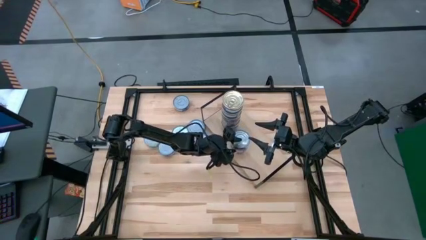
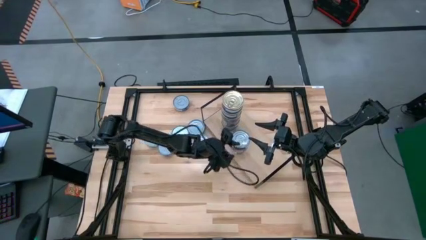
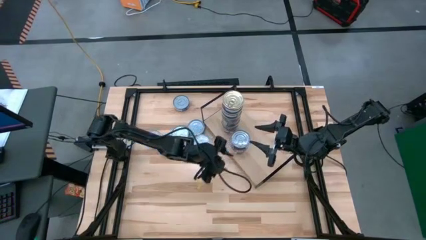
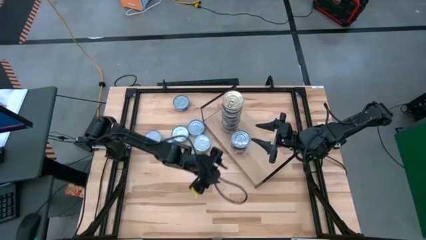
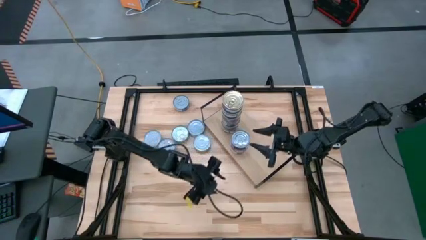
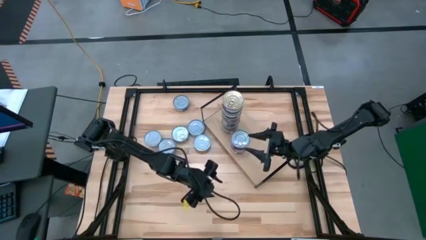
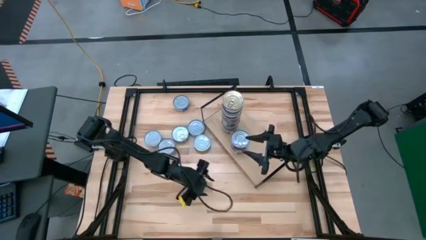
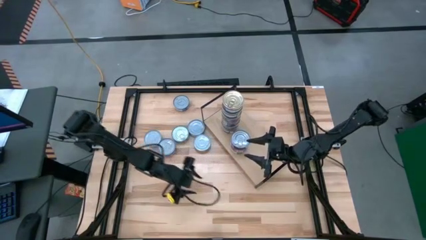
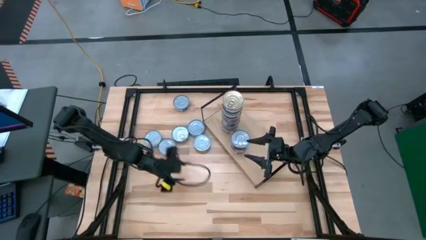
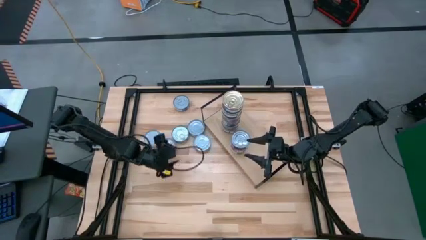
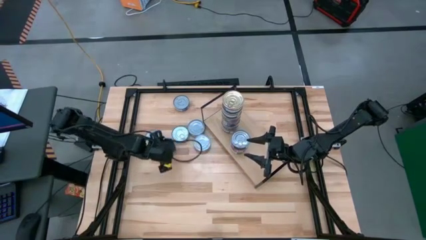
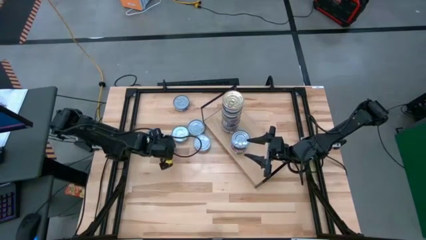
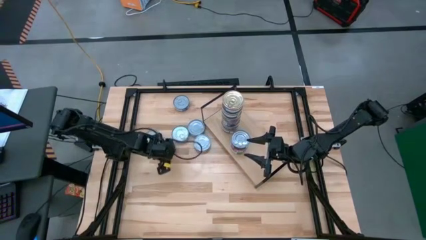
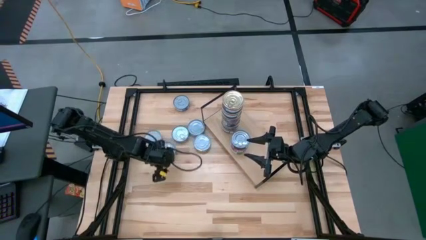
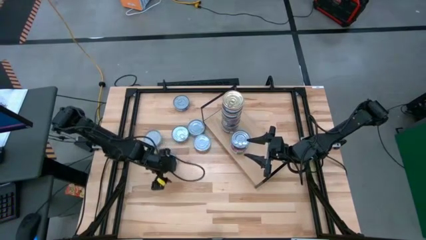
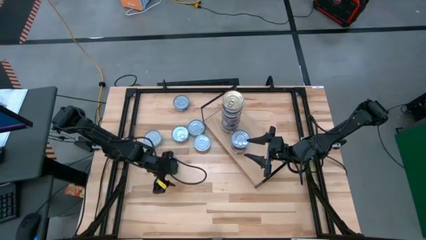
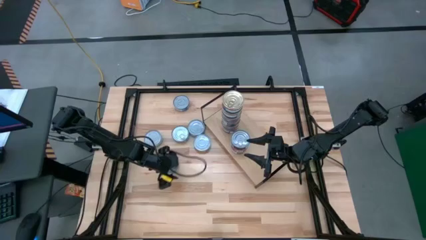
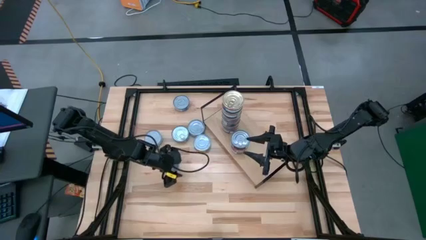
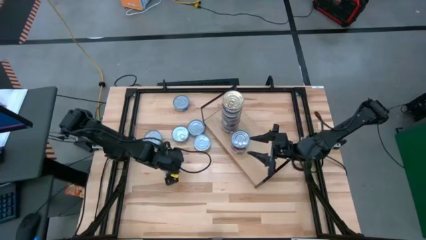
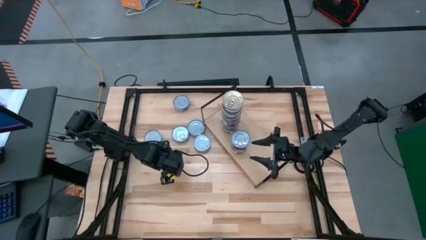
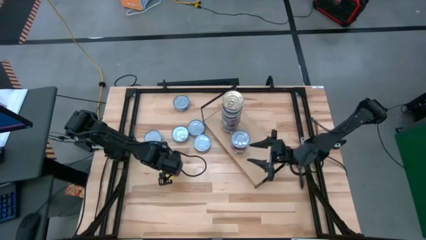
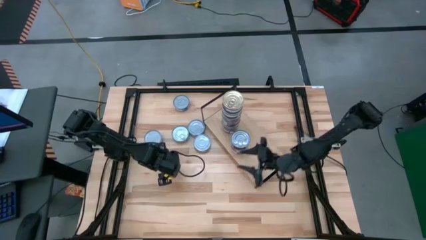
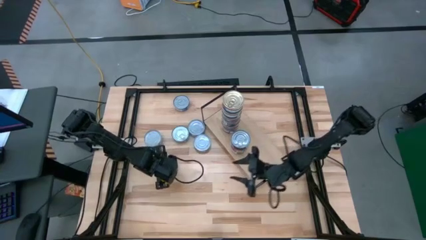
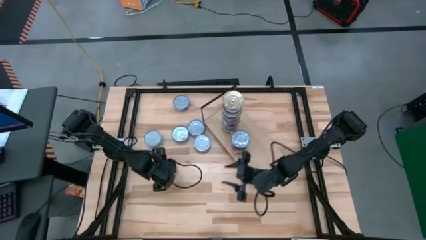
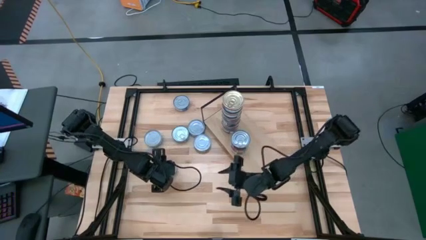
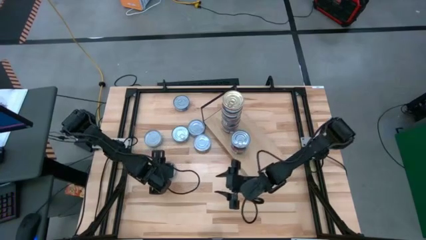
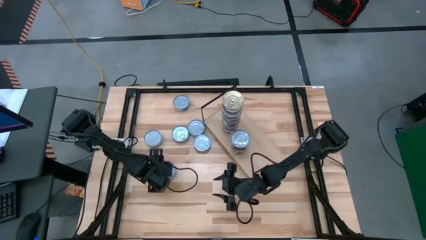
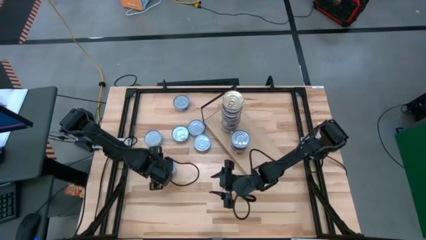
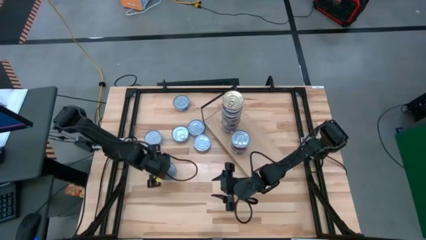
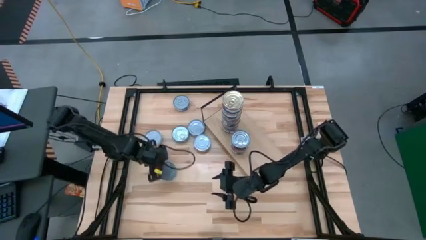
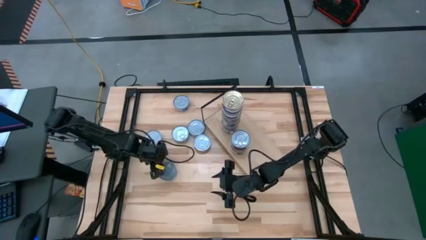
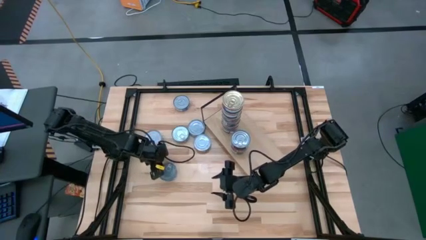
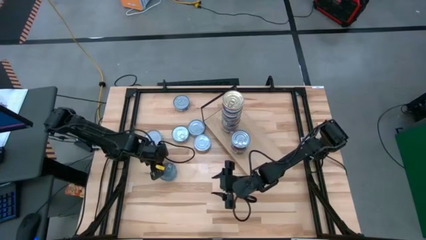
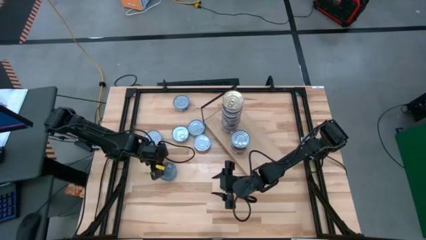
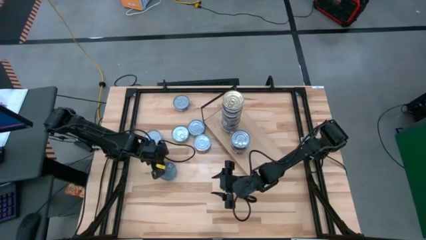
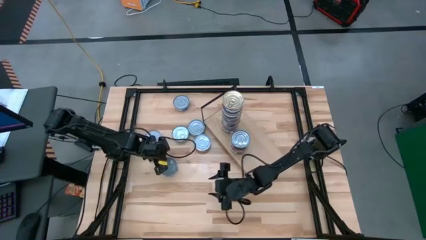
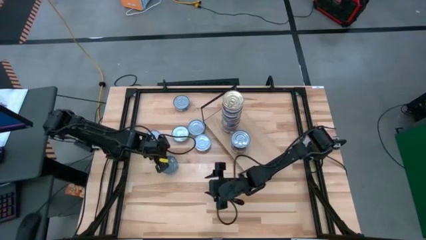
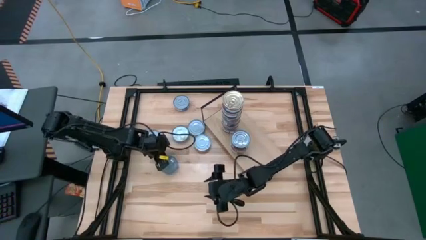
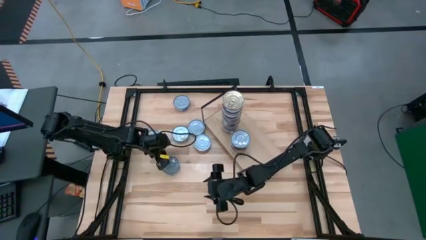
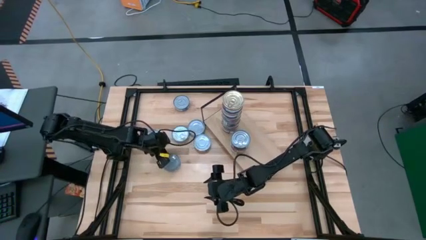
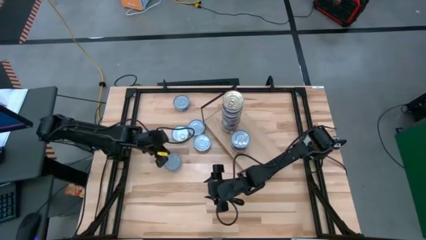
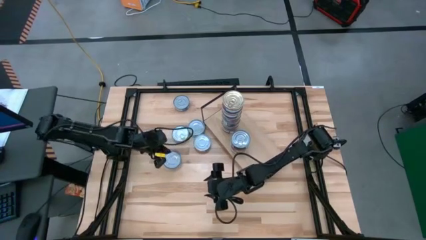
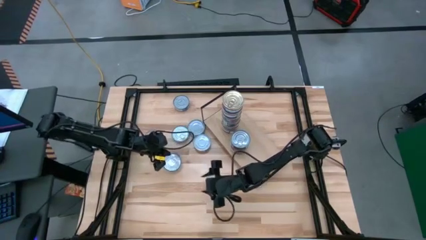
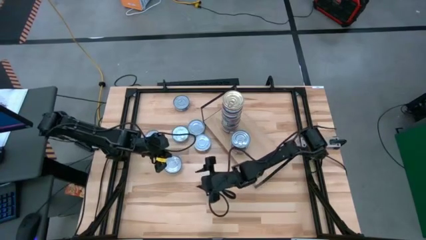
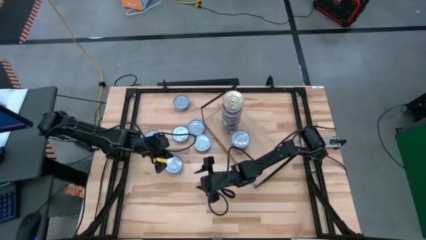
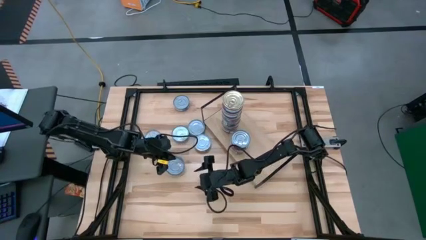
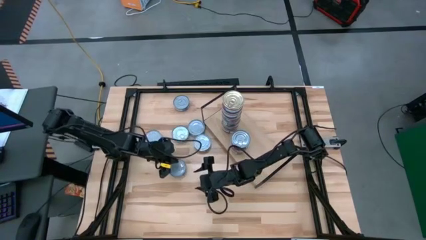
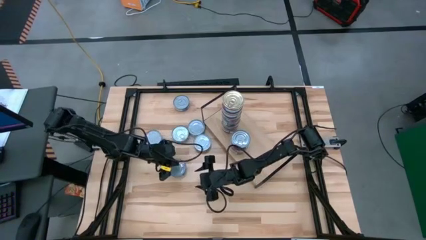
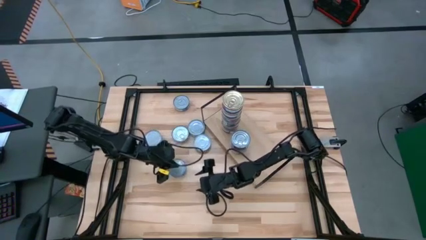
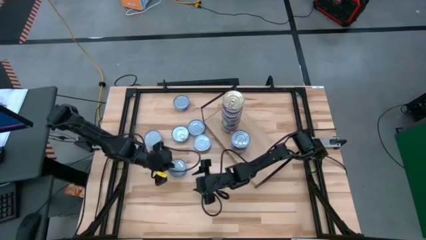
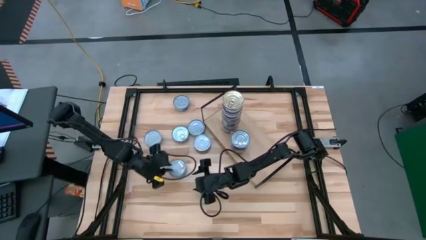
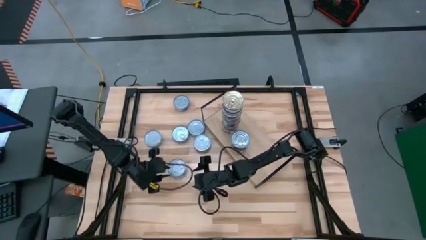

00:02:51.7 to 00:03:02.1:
Task: Stack canned seafood by type on shelf
Stack the blue tuna can on top of the blue tuna can on the shelf

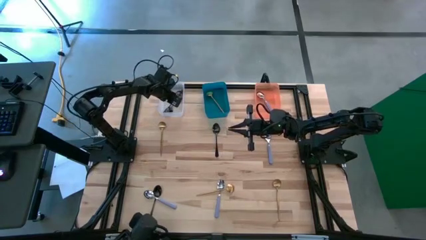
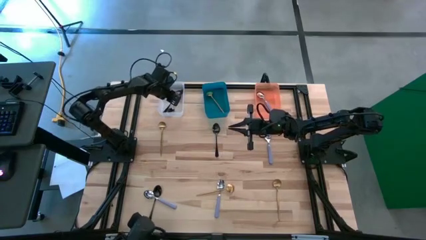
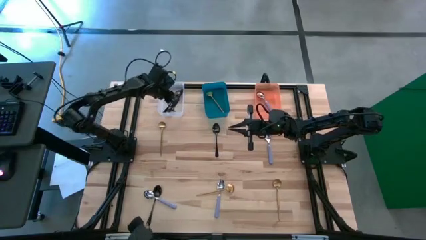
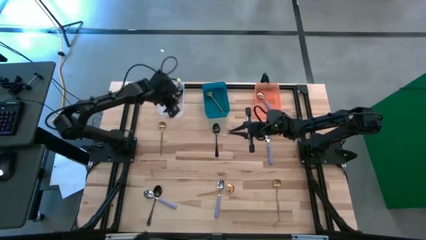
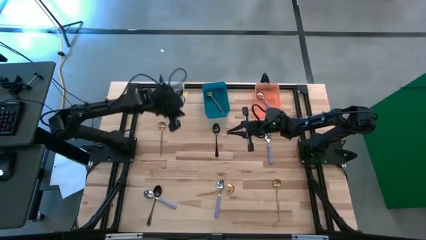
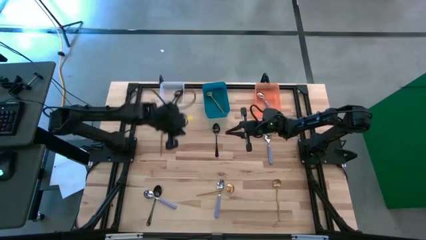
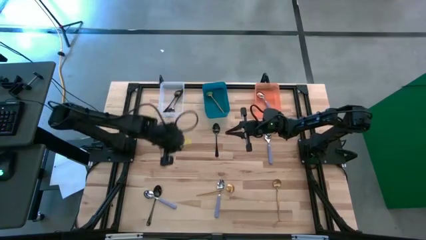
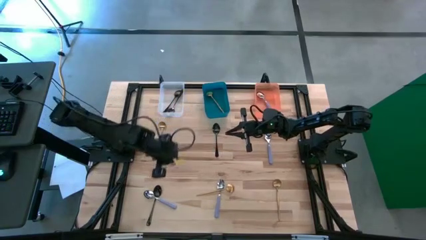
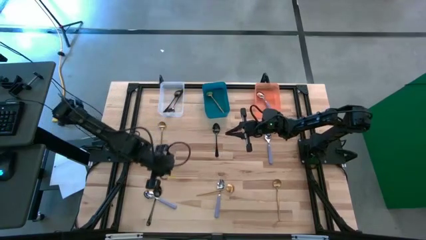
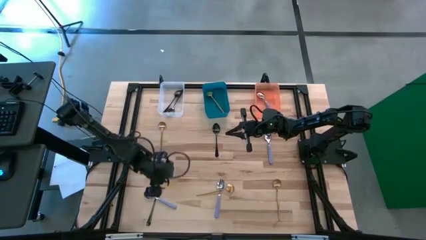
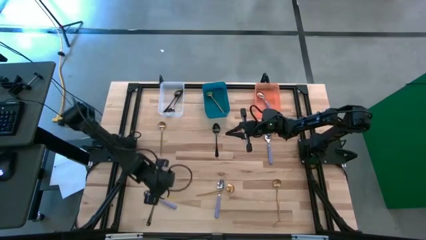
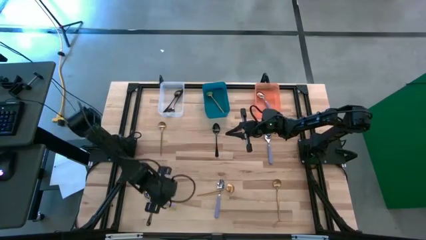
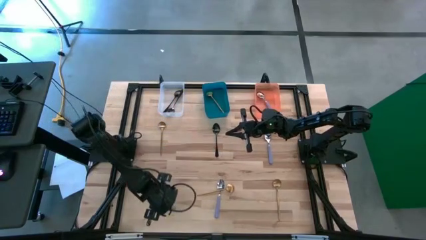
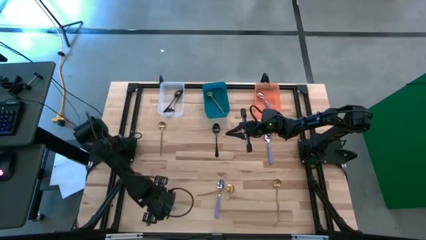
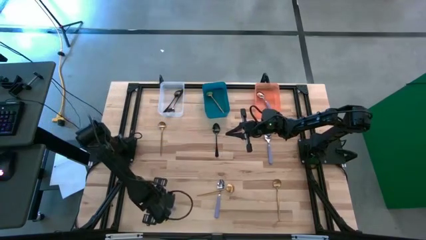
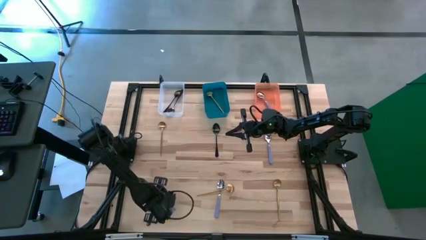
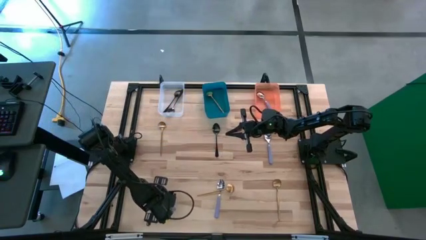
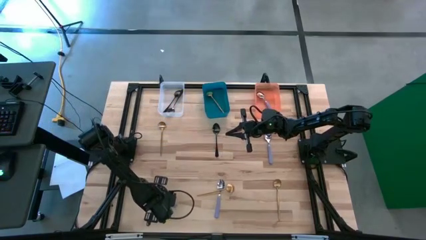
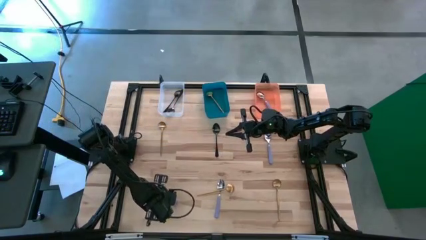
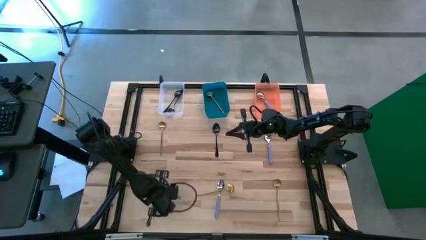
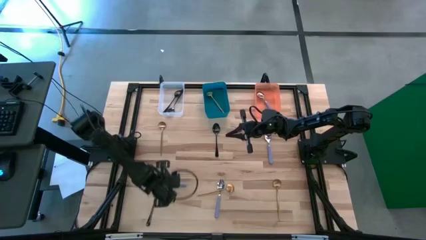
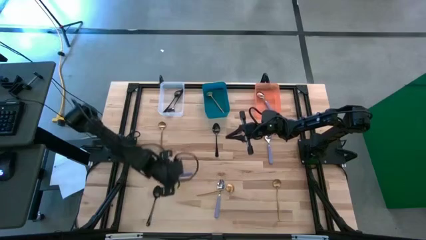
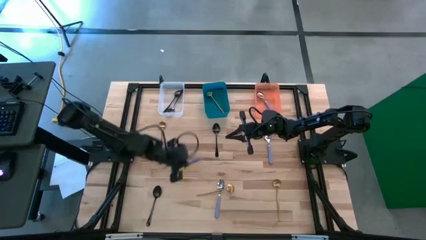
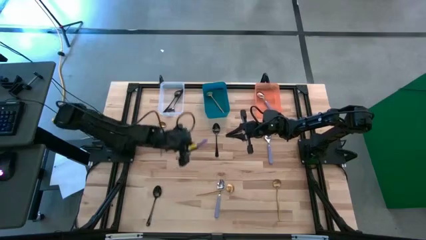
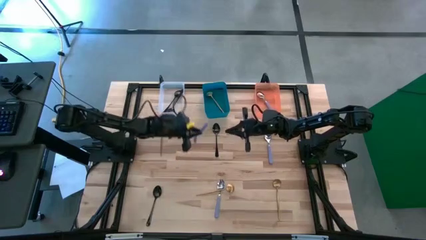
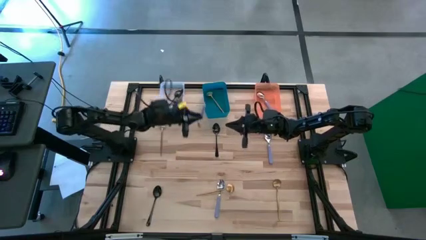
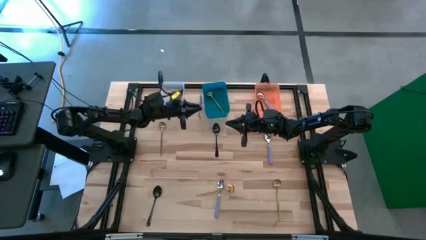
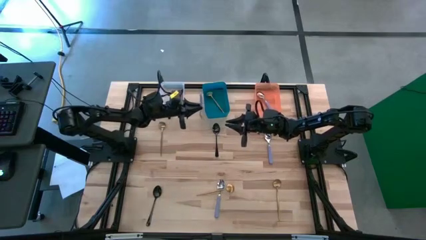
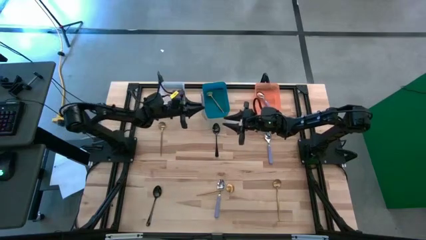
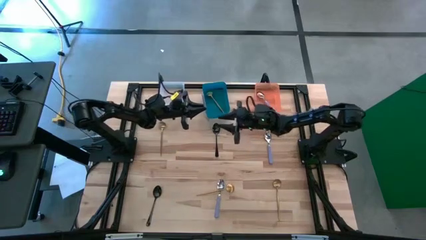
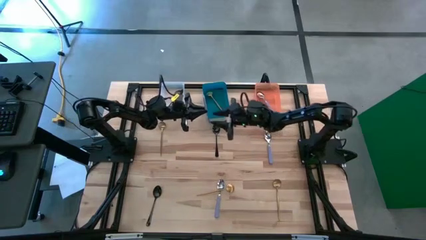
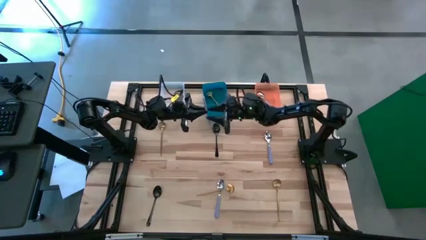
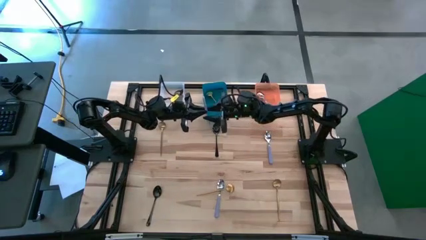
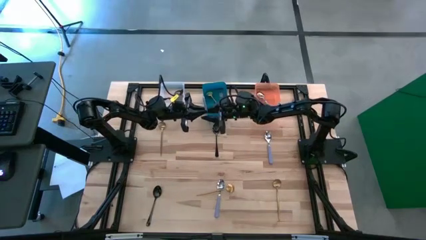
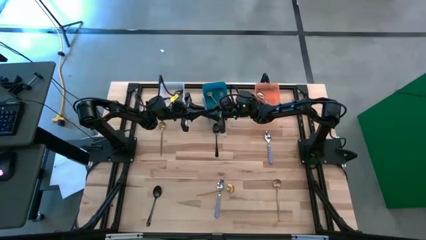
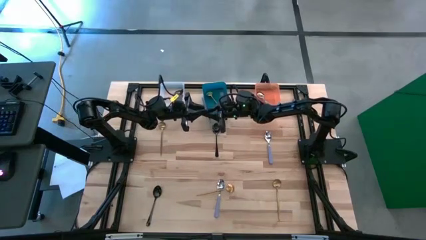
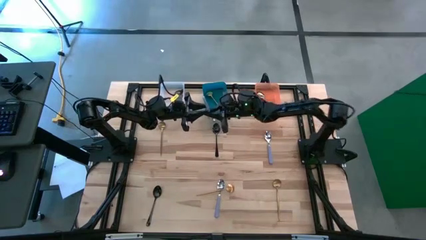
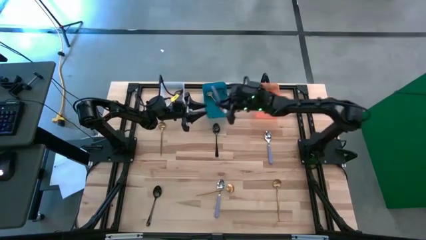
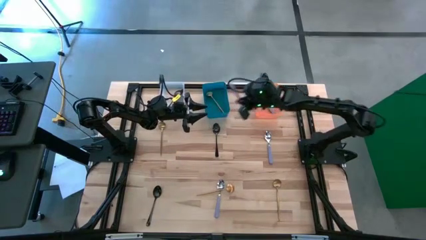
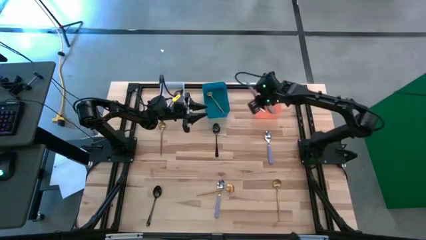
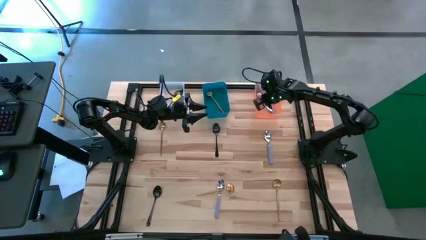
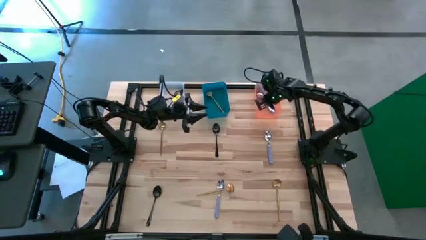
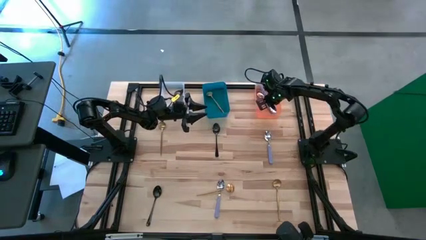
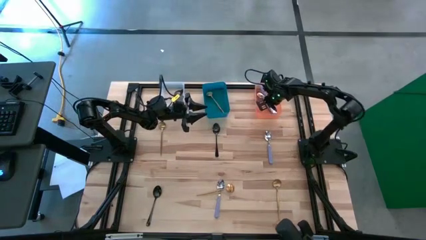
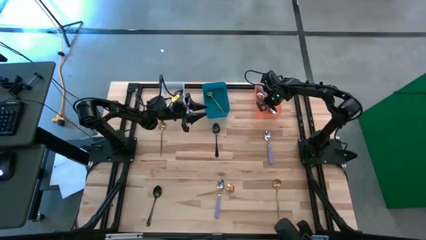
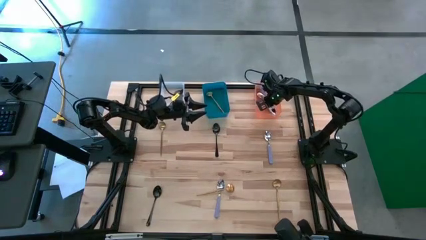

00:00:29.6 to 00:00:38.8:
Task: Sort silverware by color (type)
Put the left purple spoon into the orange bin
